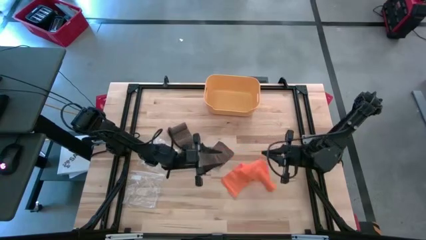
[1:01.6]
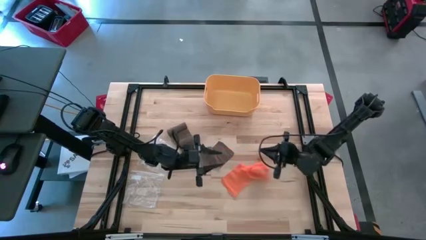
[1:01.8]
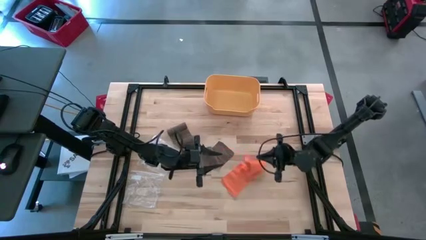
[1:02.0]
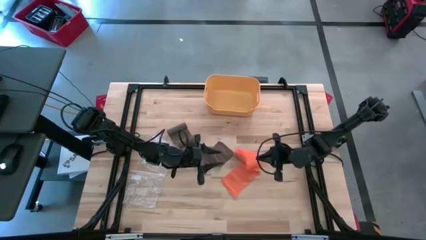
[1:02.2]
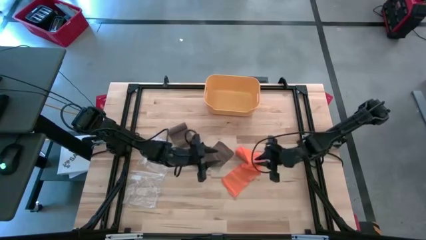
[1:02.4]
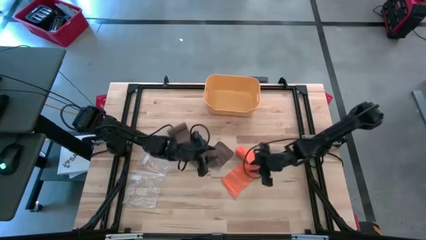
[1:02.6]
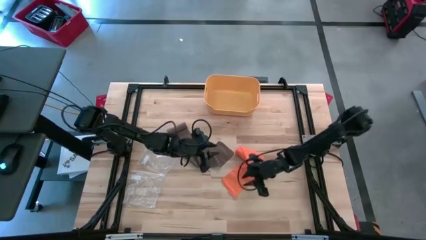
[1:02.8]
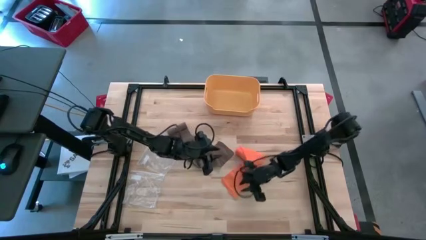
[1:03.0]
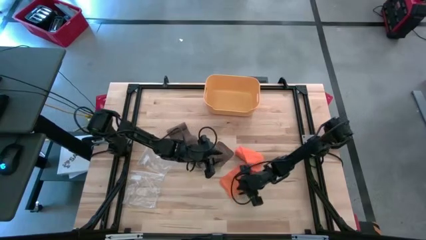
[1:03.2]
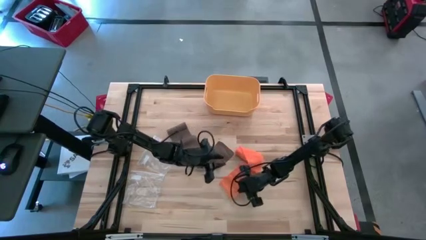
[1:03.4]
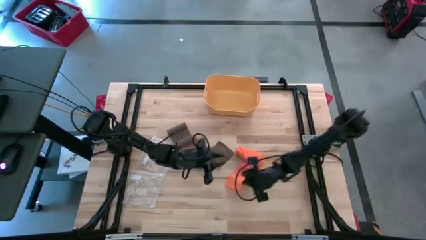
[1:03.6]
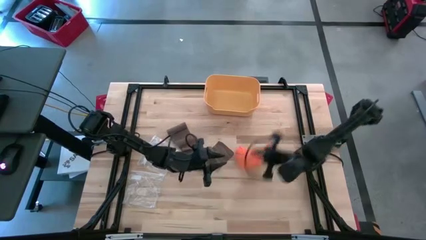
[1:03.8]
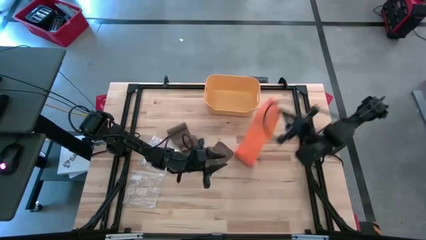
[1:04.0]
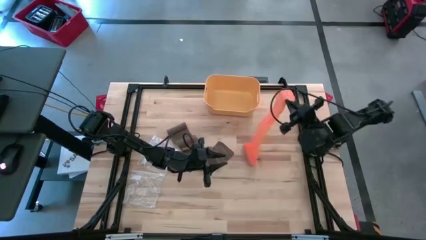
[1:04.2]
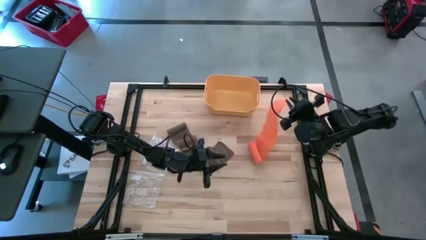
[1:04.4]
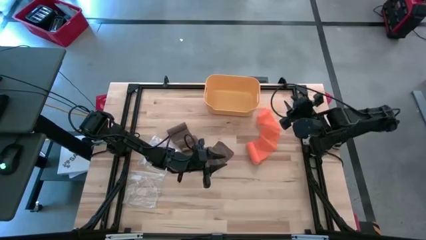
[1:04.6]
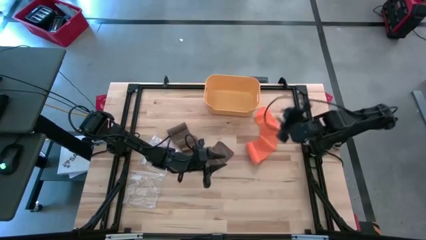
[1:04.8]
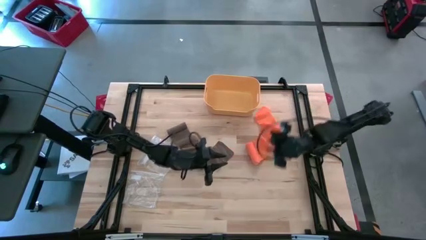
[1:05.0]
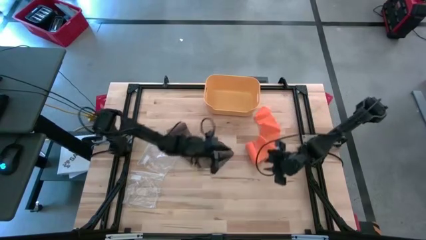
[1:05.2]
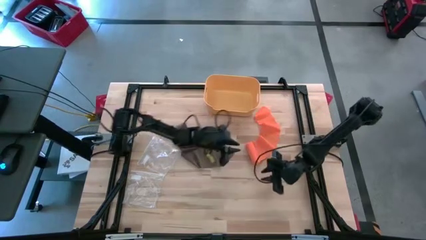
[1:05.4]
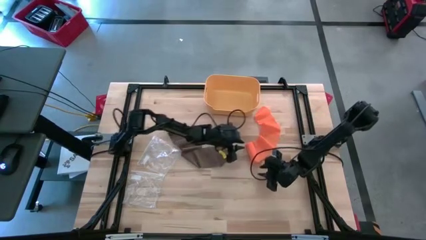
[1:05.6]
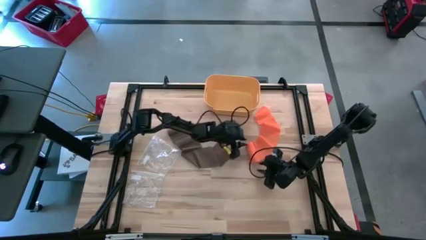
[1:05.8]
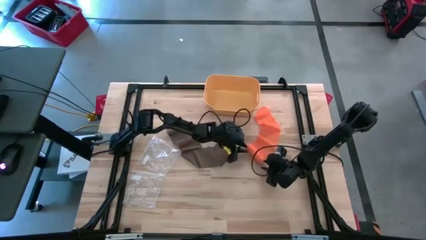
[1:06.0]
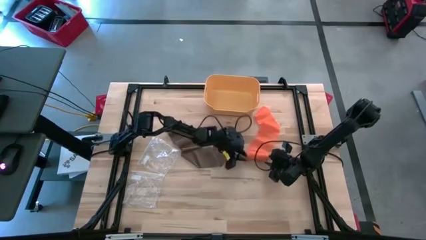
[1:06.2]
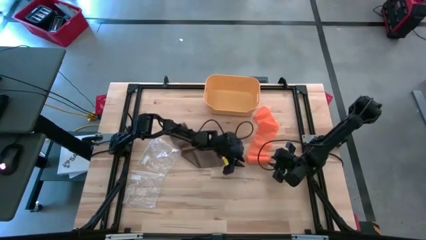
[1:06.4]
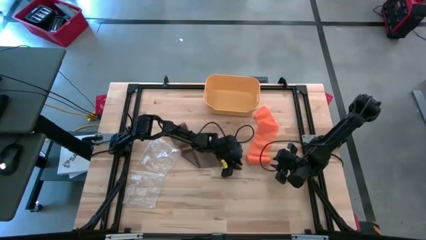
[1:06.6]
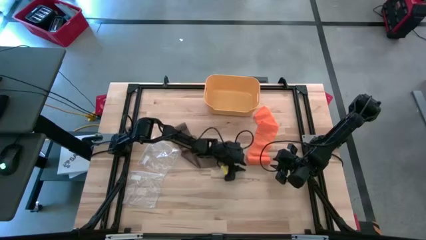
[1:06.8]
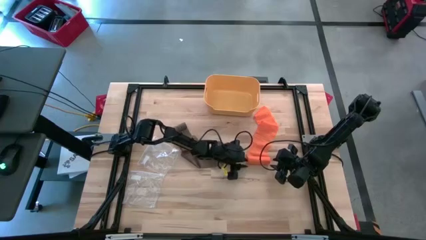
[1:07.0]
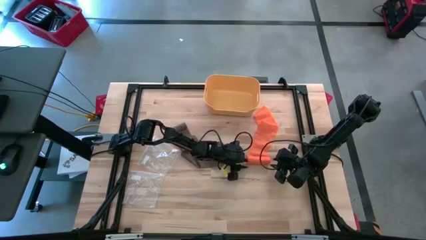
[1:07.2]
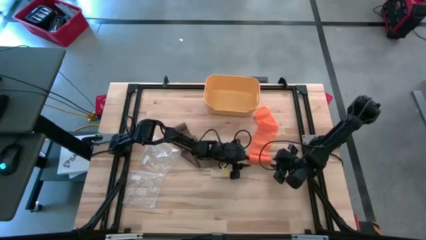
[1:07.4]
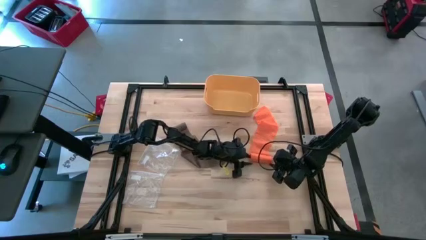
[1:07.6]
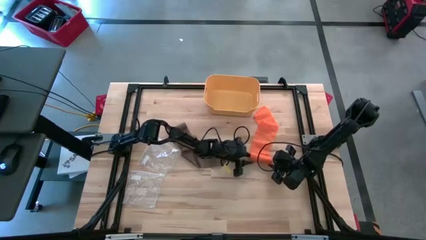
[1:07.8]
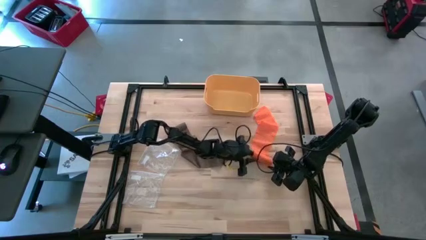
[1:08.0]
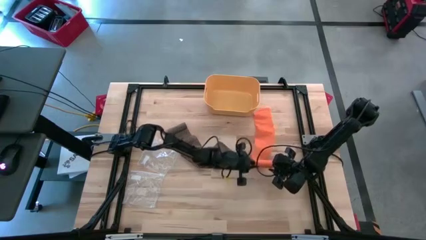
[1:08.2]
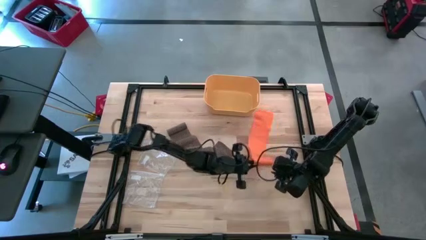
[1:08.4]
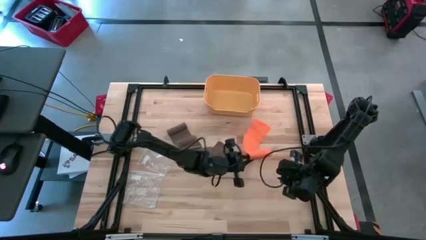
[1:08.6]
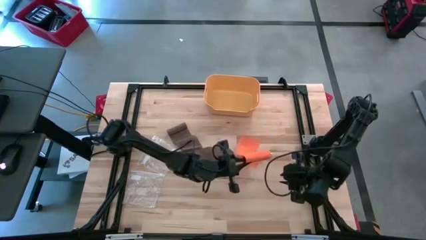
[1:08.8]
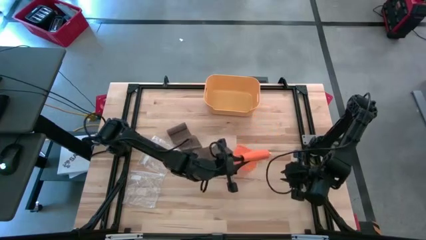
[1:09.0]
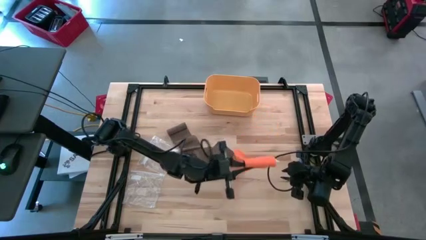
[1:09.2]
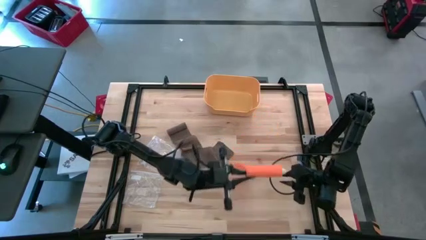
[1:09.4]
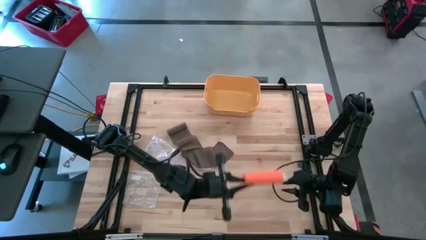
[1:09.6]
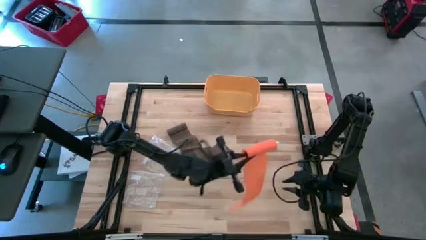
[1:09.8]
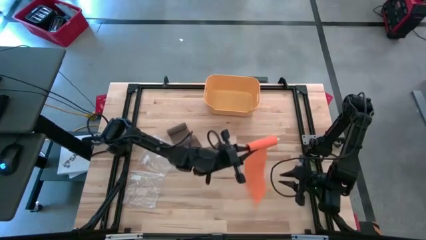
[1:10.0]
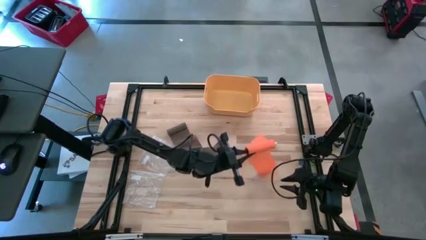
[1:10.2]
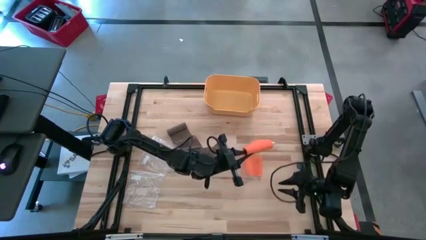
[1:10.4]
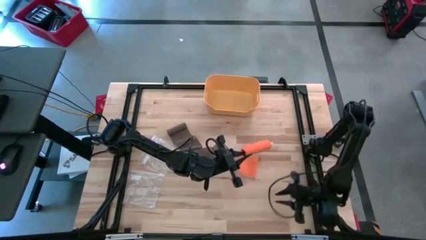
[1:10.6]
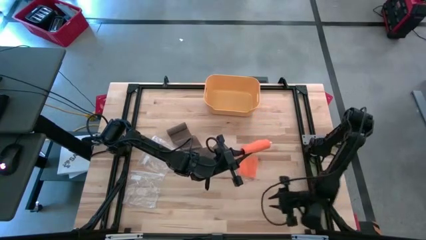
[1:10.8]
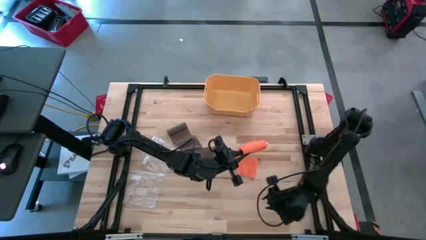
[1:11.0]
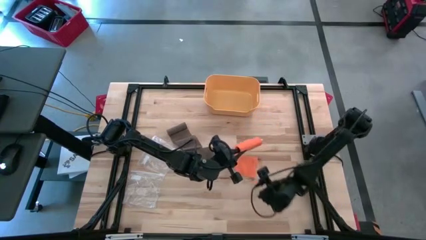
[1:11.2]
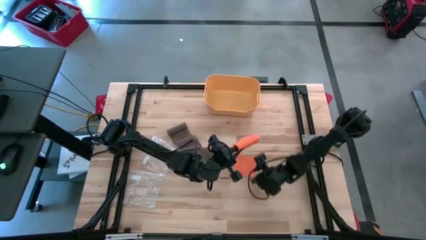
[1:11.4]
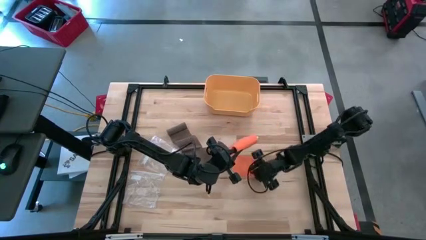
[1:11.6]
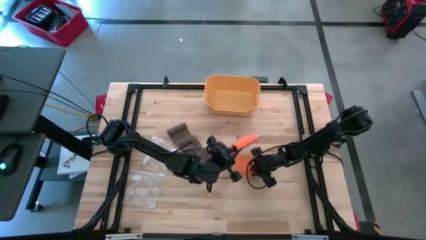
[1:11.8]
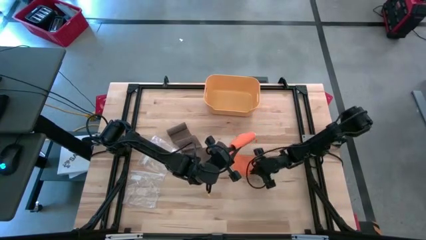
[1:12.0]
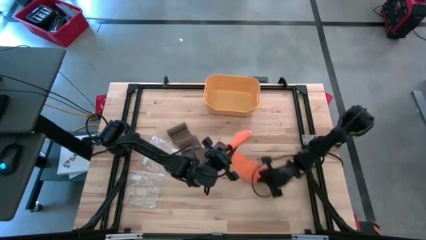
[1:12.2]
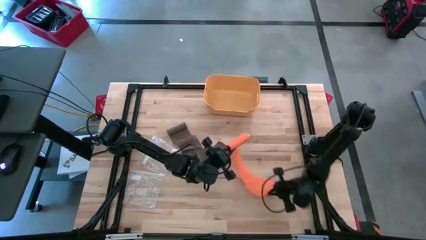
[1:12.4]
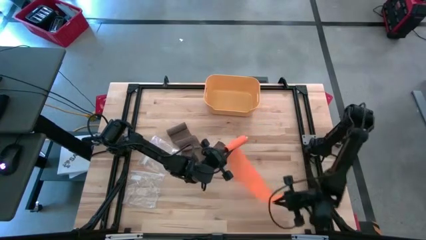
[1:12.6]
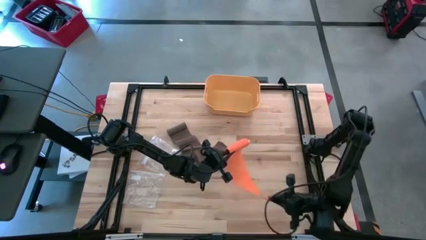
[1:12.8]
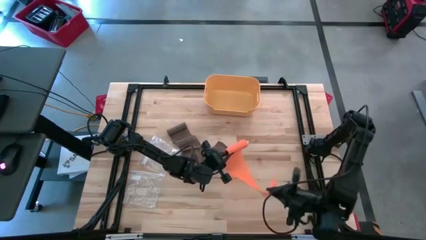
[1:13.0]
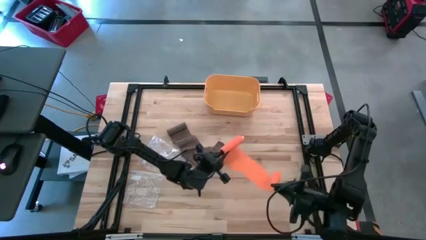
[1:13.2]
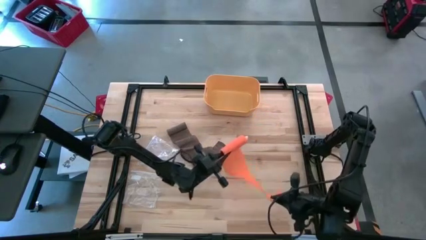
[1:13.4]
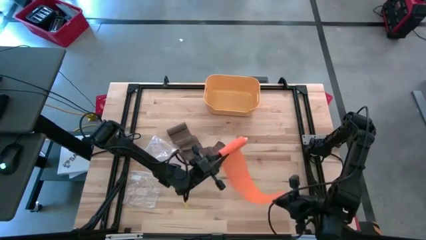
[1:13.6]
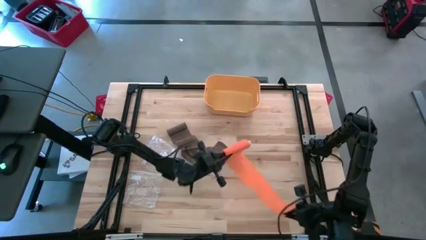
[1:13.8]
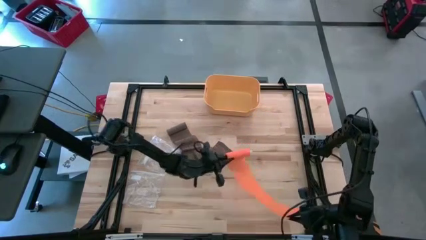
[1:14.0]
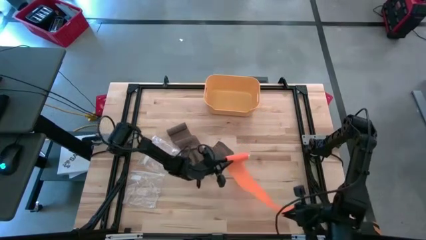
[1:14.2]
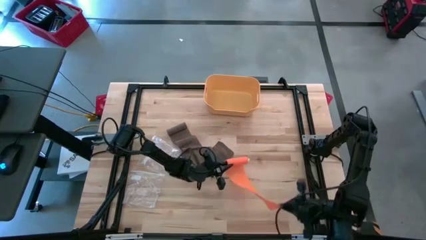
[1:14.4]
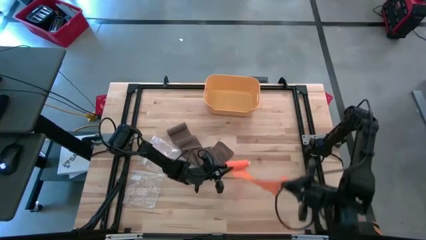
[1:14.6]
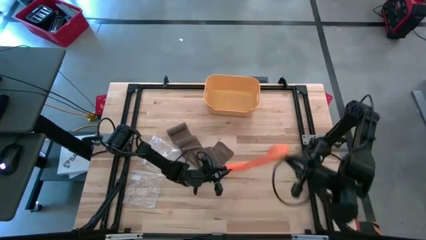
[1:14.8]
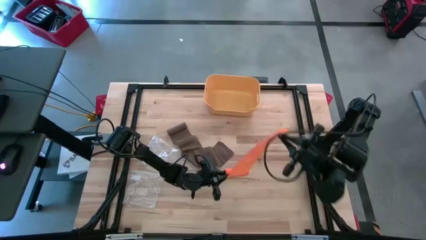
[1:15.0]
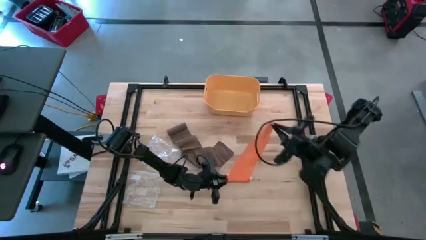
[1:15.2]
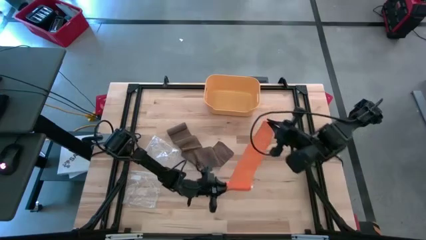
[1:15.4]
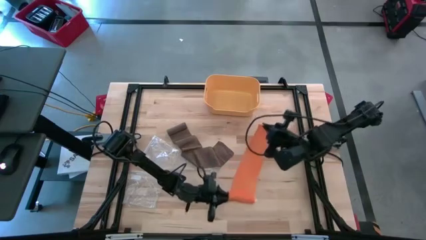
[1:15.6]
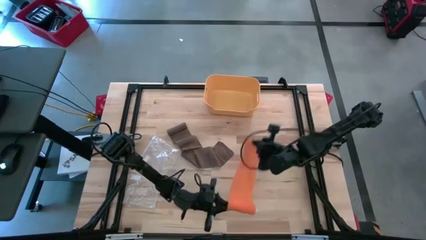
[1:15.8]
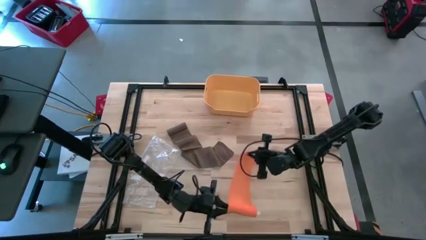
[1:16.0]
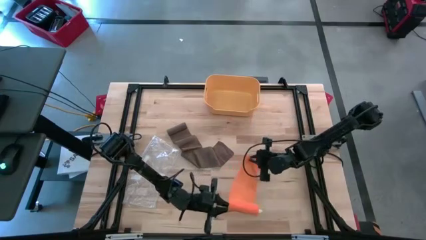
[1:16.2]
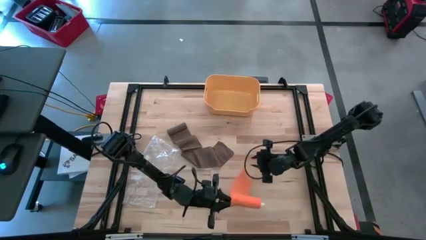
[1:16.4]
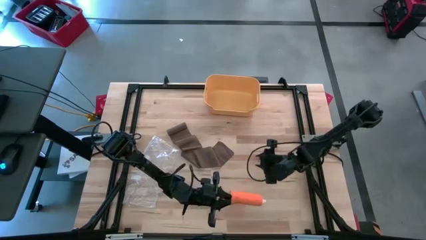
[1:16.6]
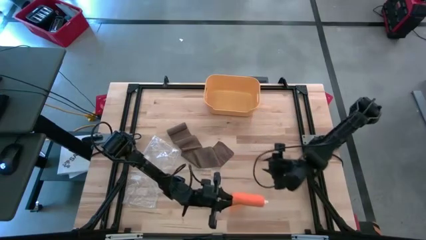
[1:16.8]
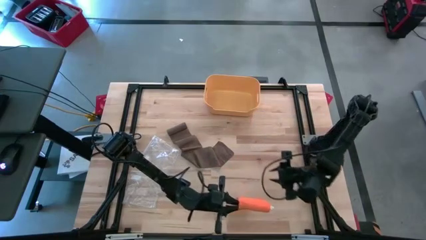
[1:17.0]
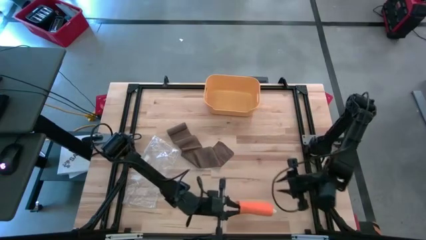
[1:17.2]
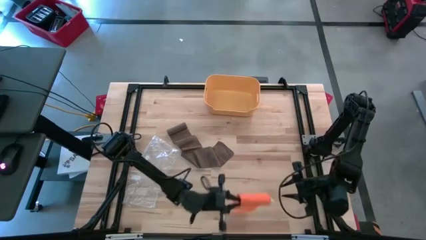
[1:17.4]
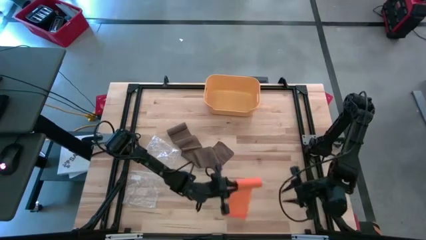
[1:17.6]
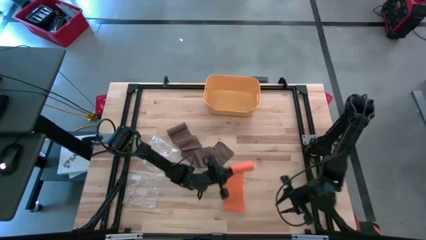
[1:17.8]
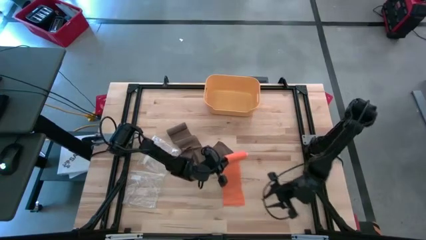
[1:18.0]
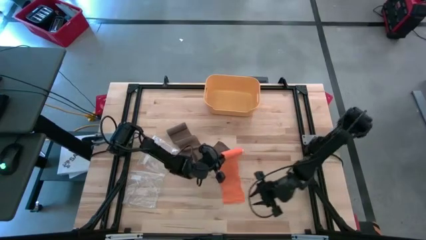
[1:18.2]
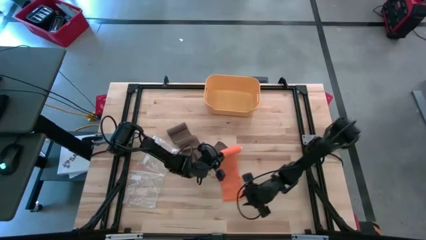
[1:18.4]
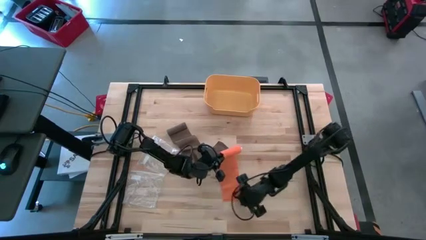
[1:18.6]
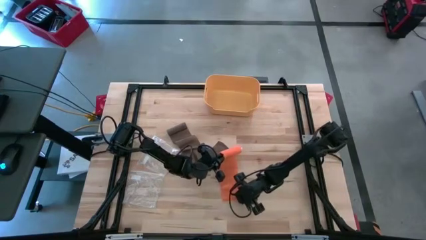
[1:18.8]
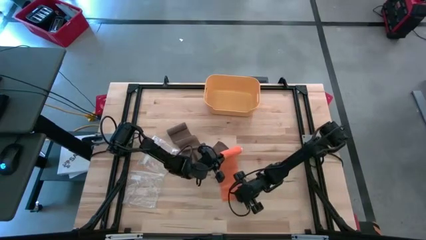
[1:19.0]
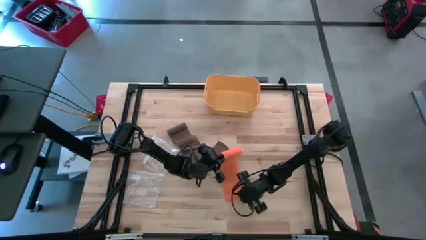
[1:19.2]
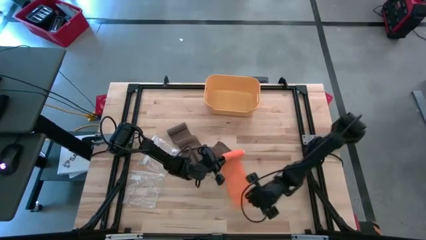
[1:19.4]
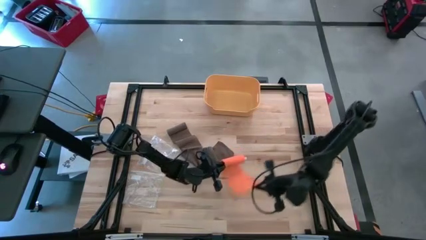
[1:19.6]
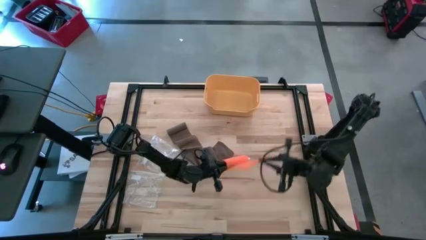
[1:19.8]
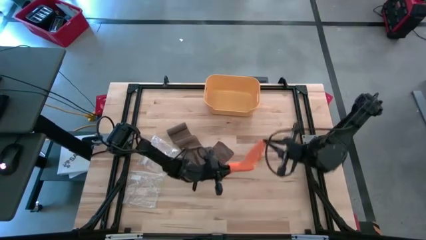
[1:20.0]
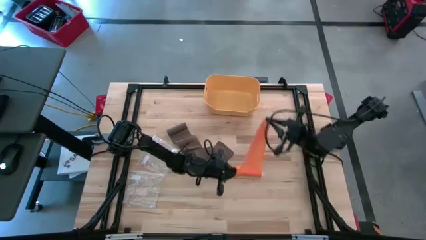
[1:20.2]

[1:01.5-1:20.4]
Task: Roll bandage
Roll the orange bandage
